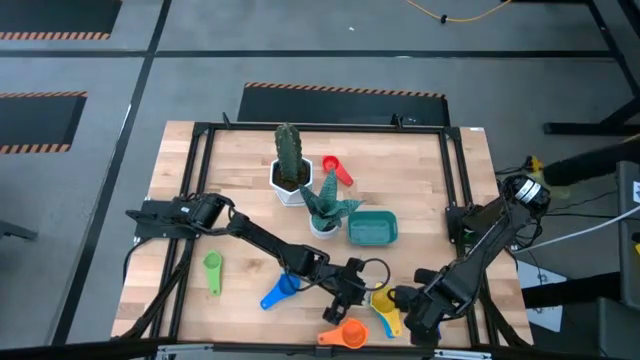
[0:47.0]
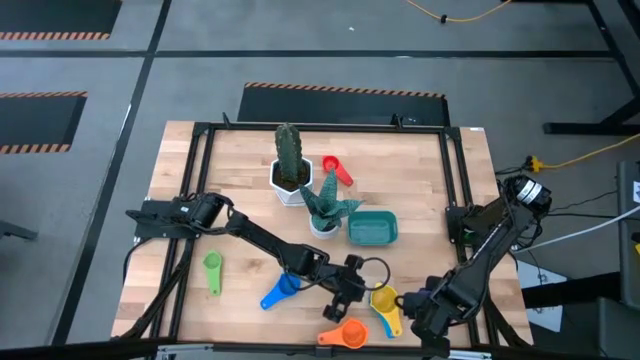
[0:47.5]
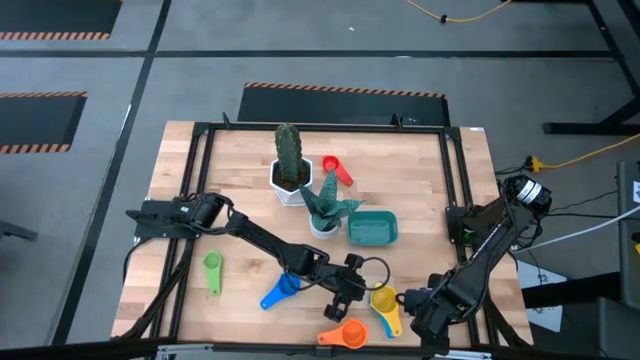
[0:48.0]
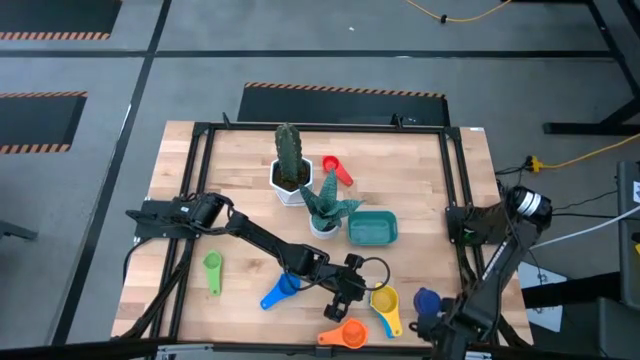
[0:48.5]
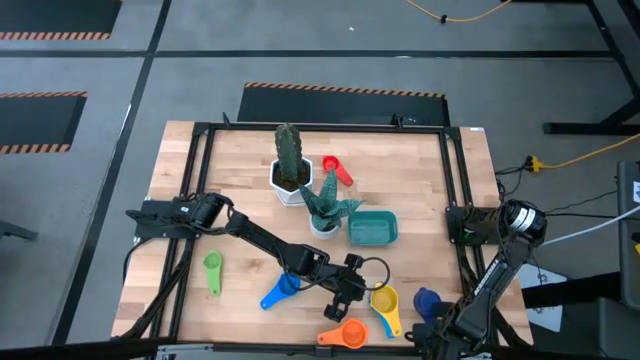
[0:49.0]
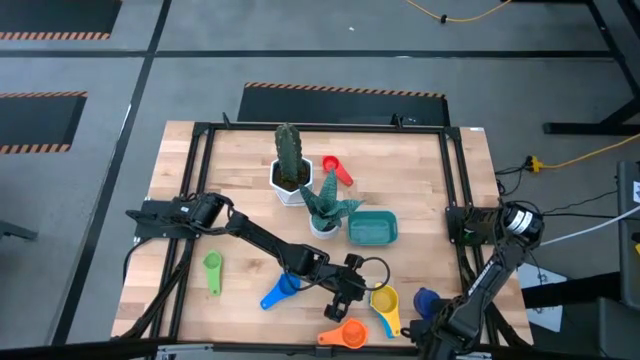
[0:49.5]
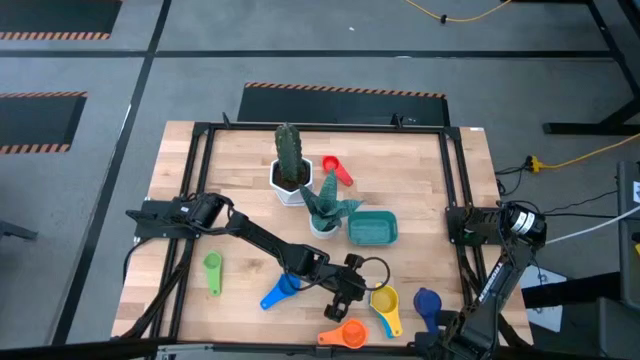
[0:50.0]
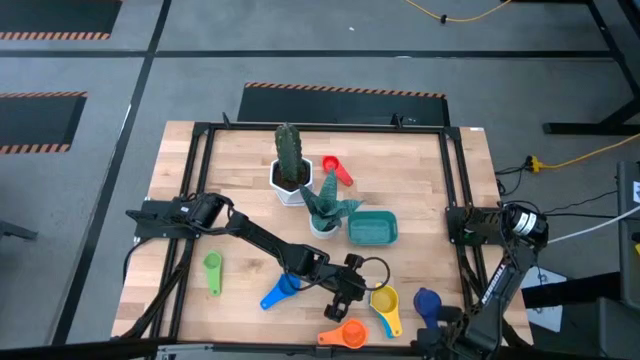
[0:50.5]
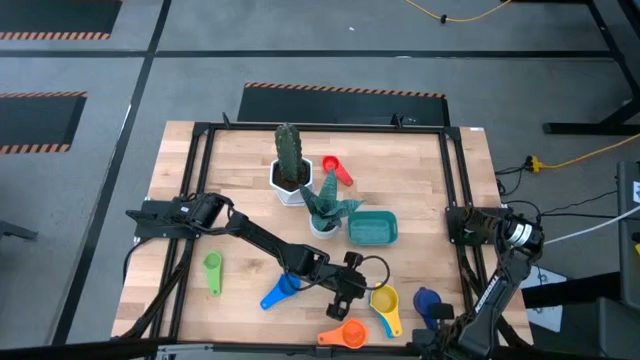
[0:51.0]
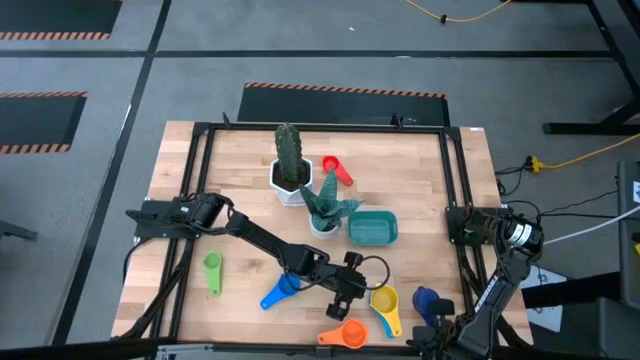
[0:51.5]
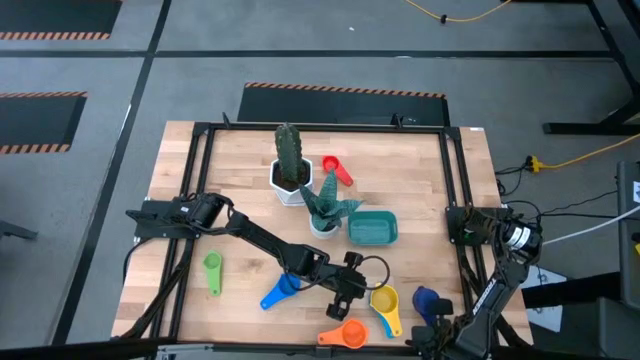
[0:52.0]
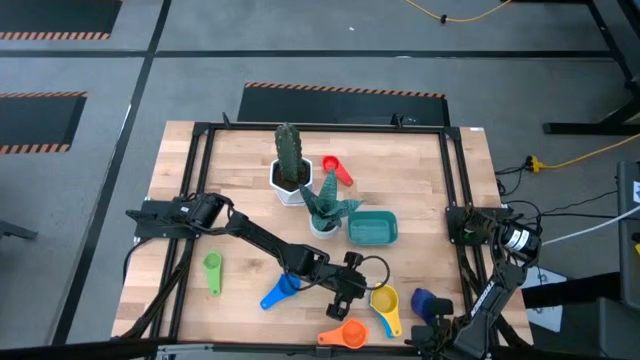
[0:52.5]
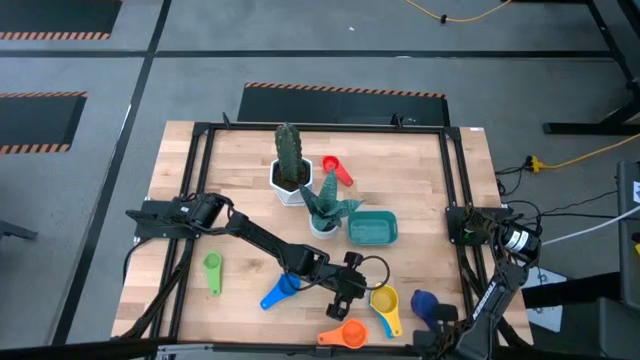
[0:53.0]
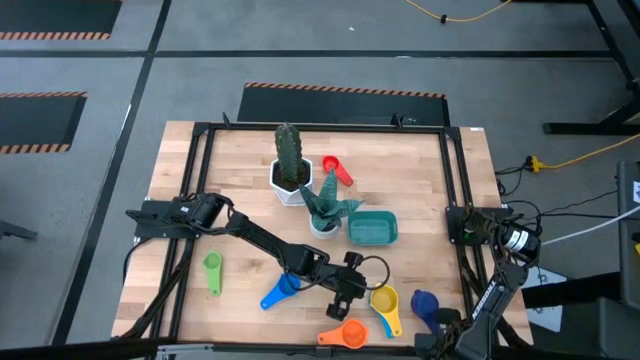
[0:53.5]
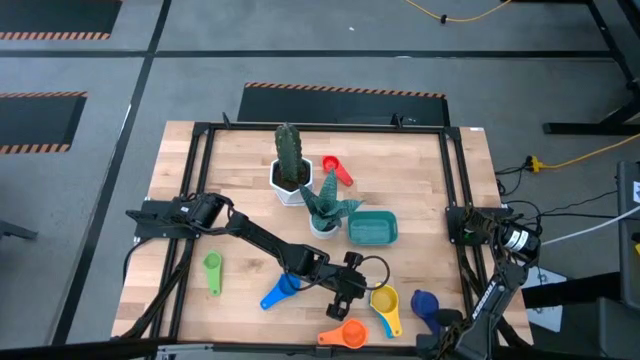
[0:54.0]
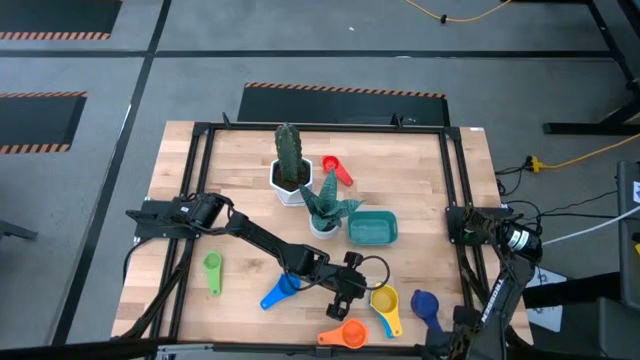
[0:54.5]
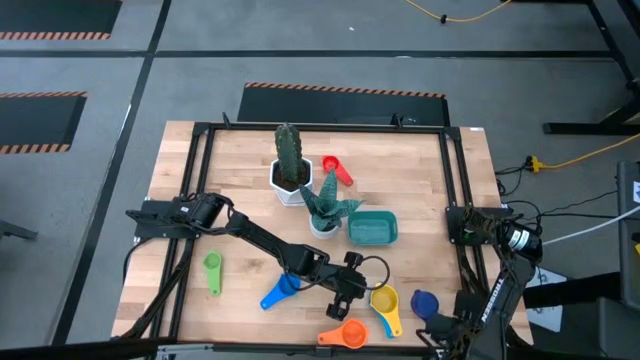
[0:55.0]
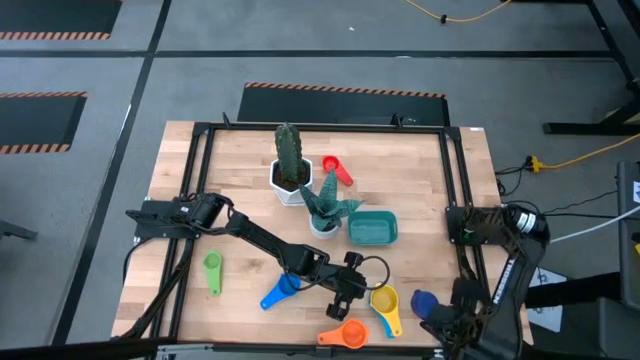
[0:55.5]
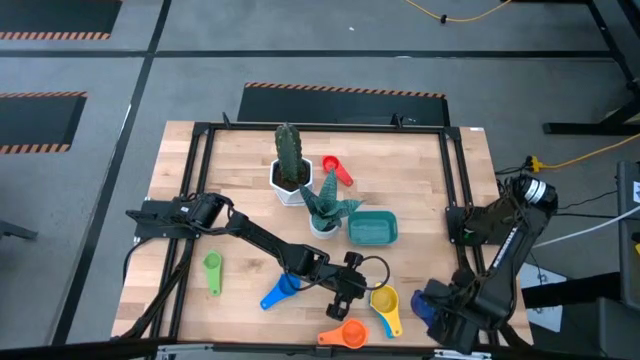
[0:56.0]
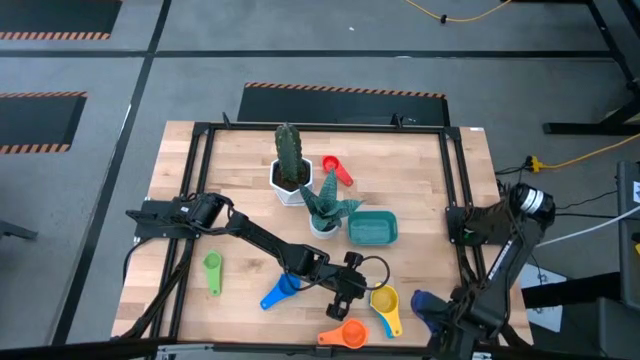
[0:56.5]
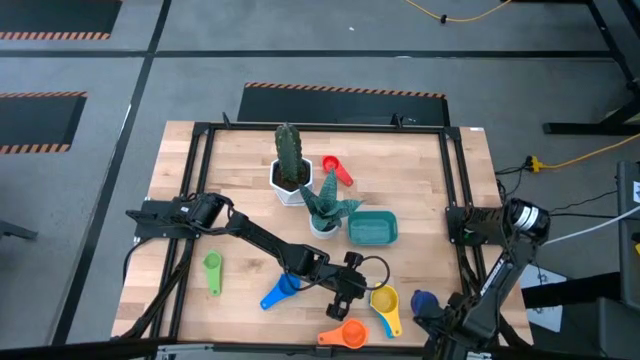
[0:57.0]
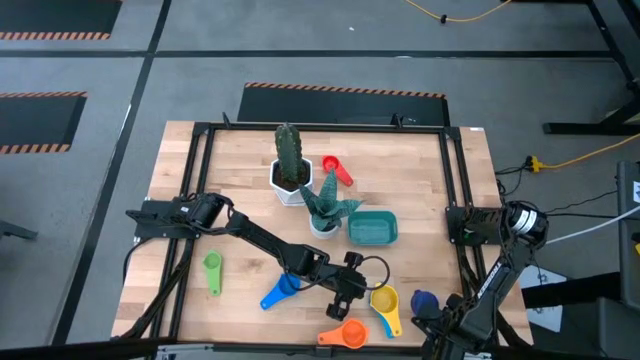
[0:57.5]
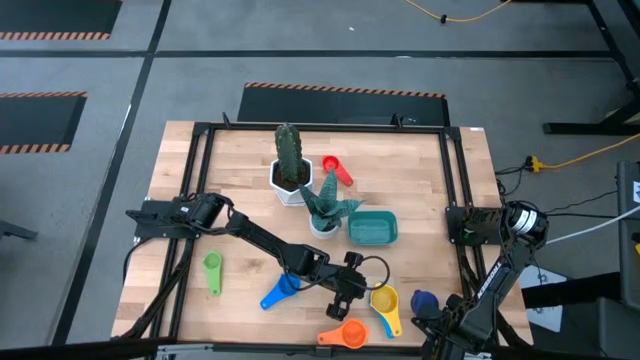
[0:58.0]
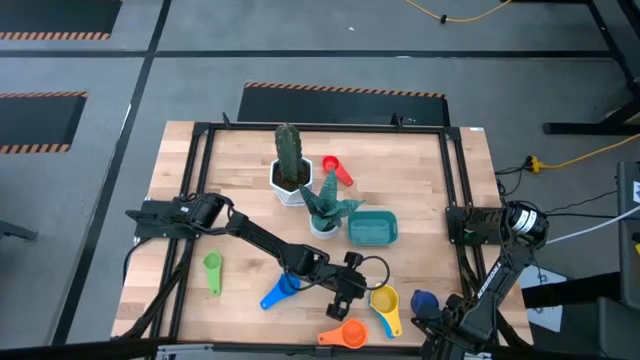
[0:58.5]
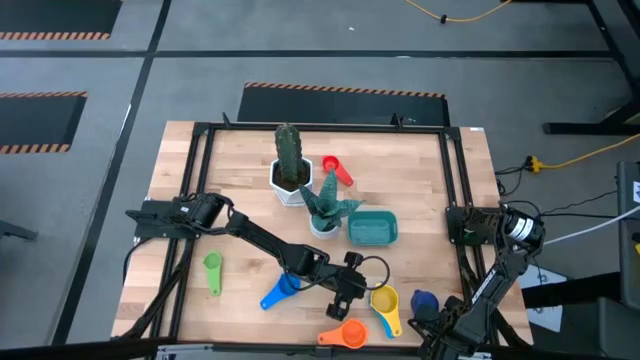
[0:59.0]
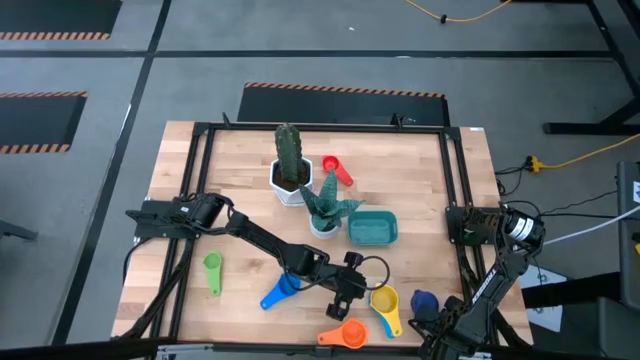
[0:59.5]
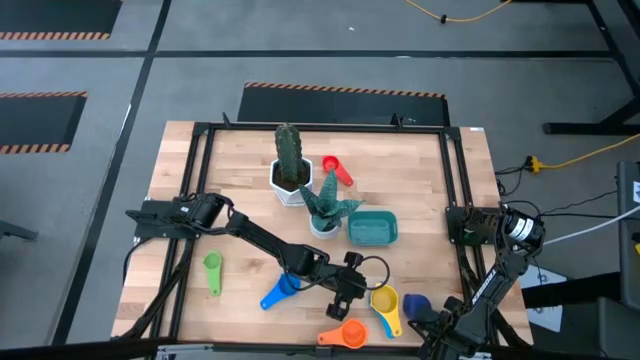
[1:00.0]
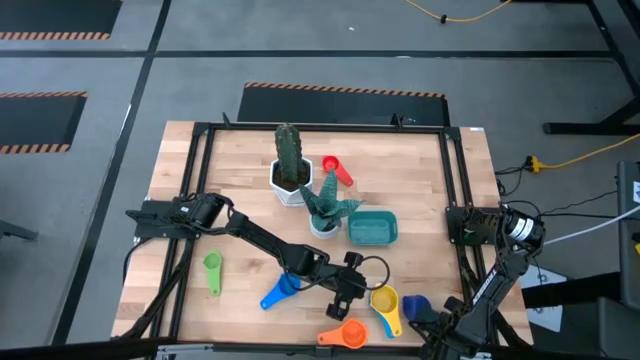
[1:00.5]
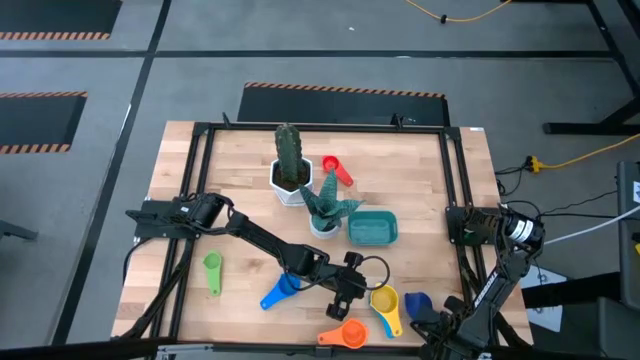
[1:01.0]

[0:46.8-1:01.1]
Task: Nest measuring cups in basket
Stack the dark blue measuring cup on top of the yellow measuring cup

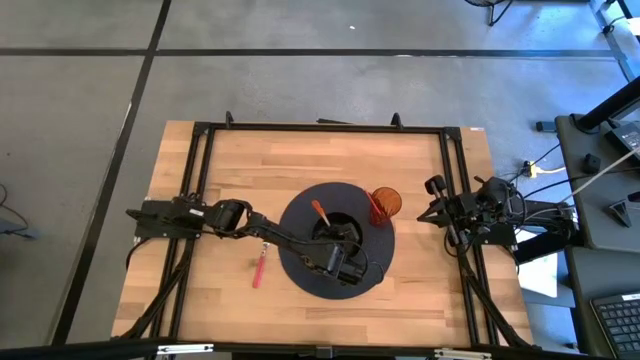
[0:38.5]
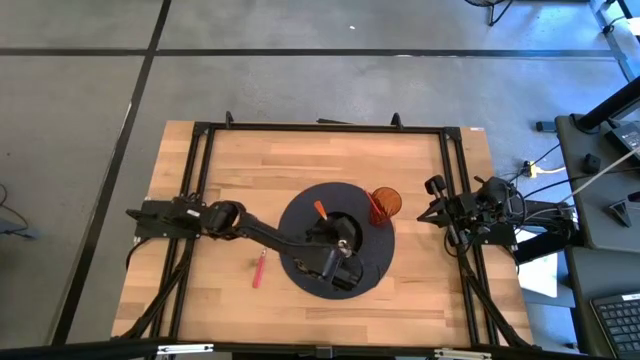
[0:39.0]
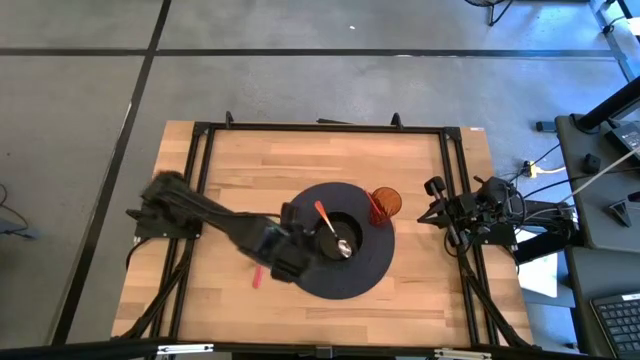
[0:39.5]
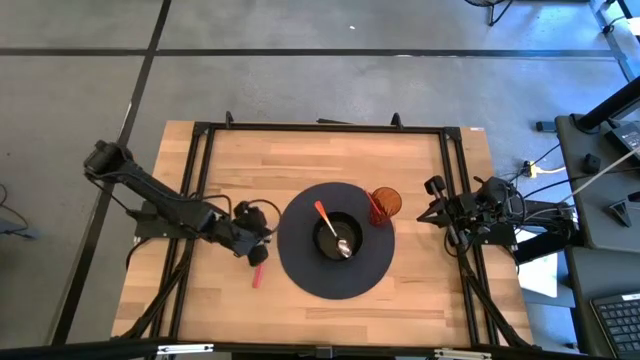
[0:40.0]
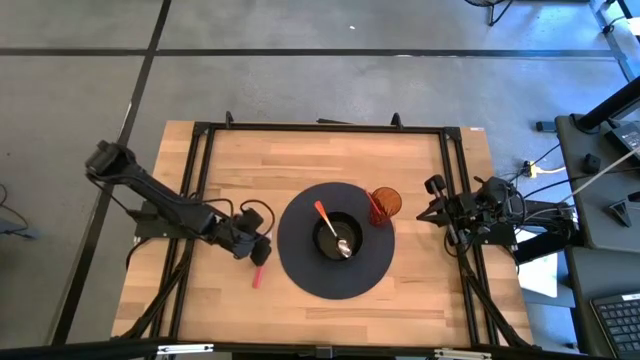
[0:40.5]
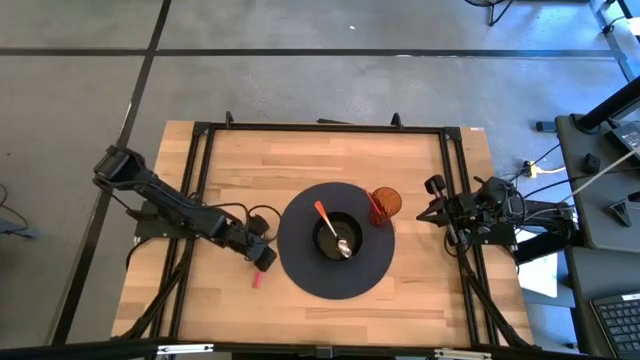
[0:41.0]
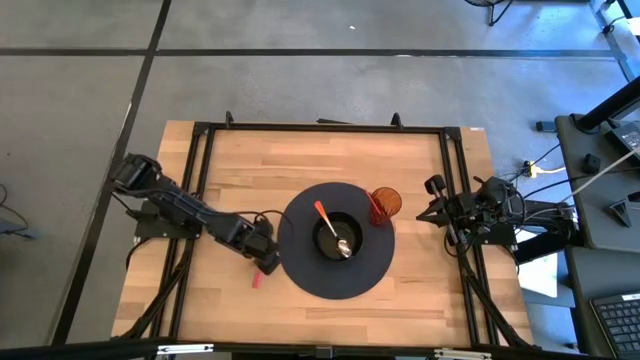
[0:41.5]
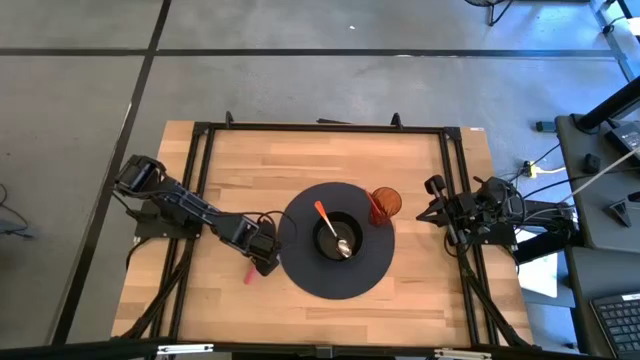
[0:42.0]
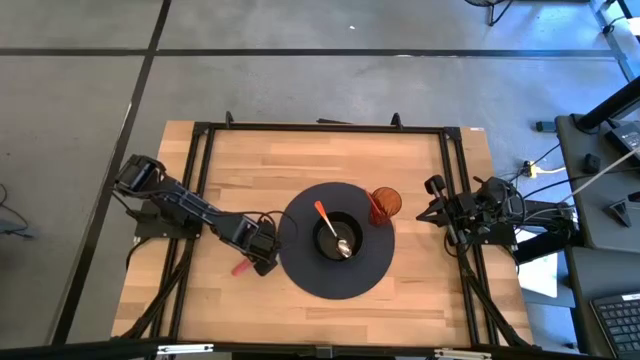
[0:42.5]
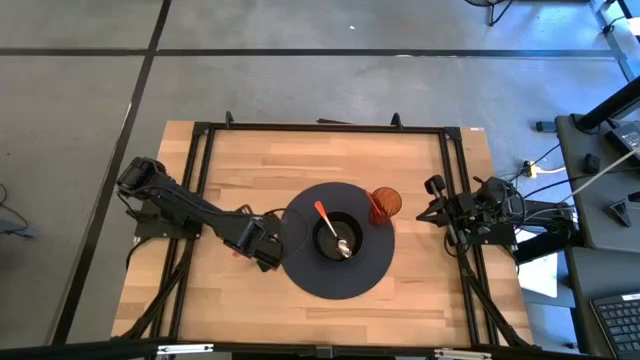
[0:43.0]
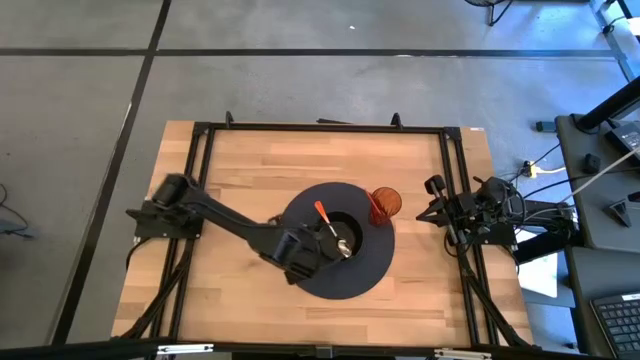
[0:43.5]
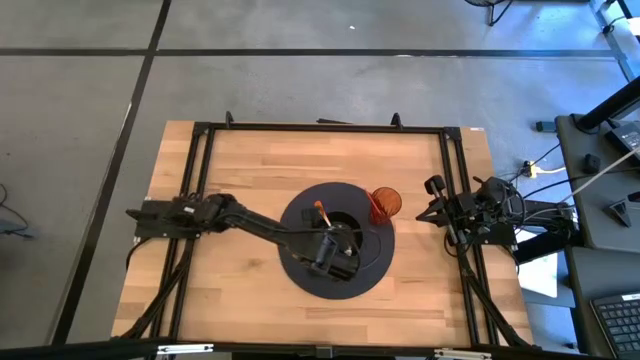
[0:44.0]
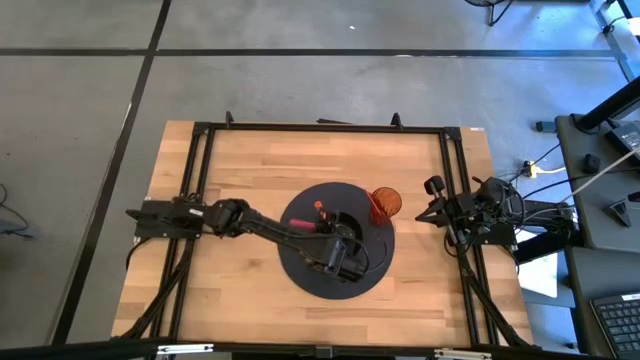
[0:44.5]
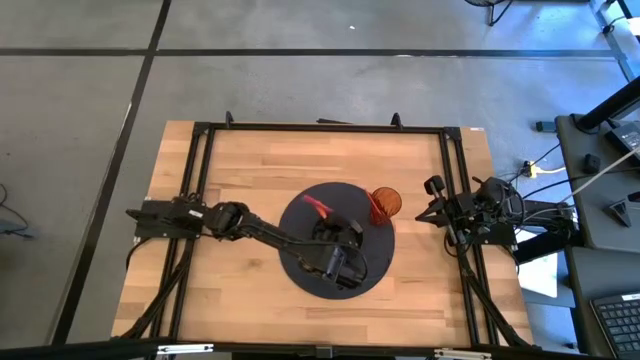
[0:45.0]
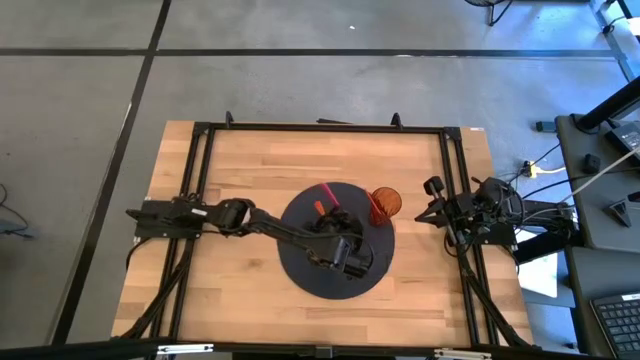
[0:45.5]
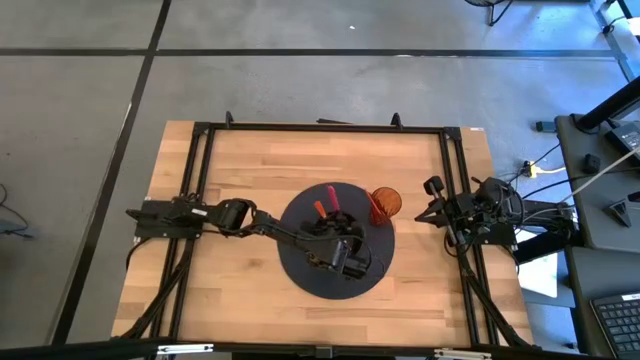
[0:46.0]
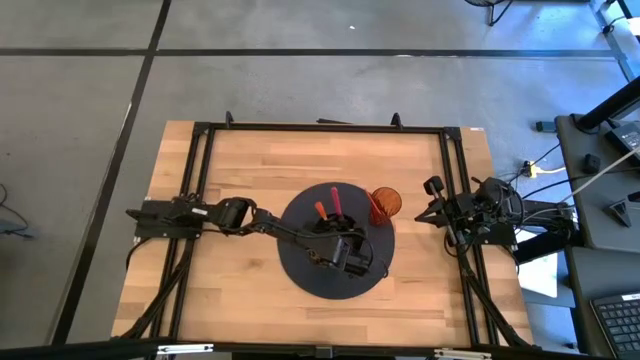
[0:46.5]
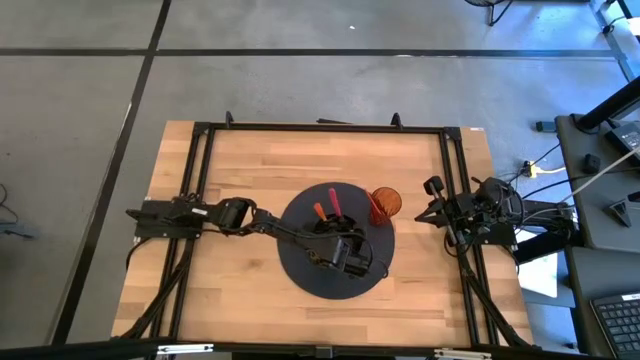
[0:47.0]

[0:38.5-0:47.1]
Task: Pick & Place Utensil
Put the pink fork into the black bowl on the black mat
